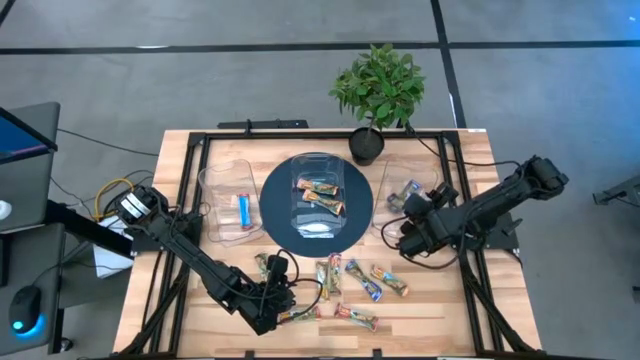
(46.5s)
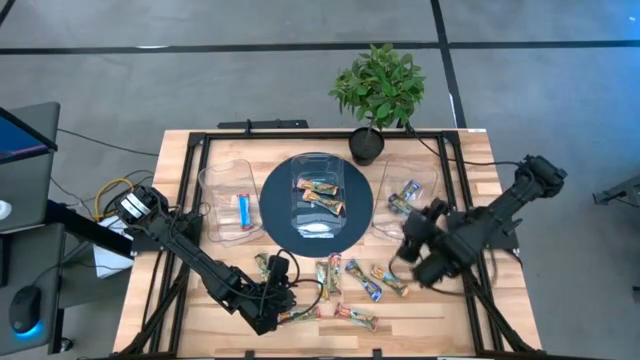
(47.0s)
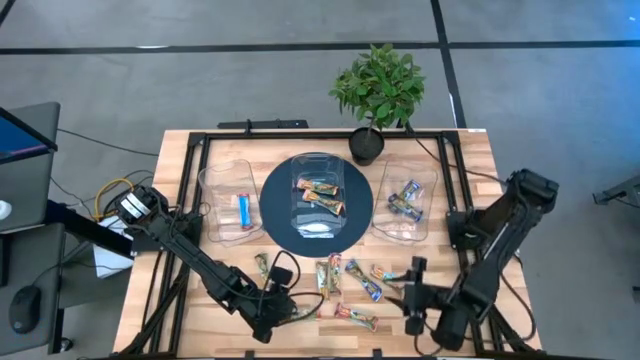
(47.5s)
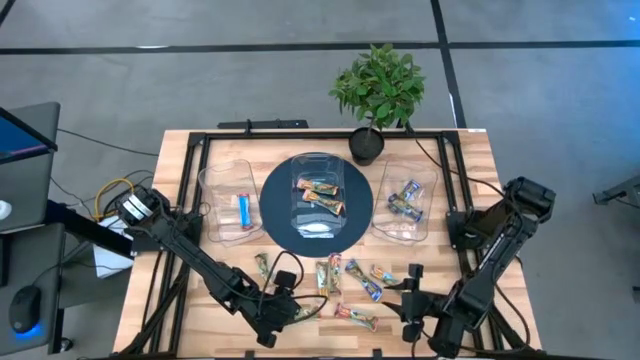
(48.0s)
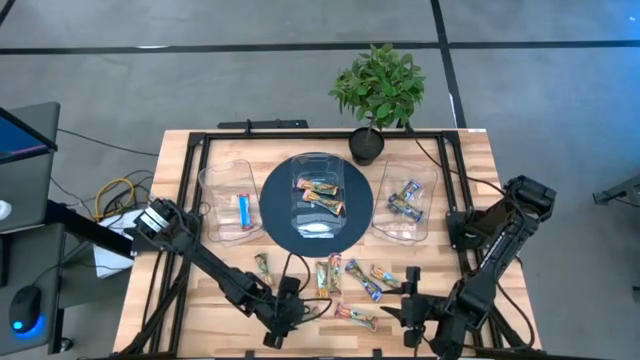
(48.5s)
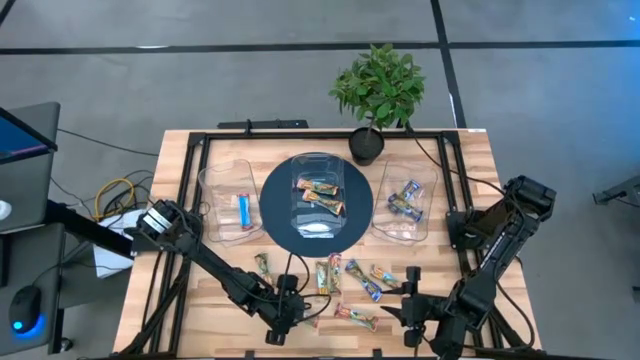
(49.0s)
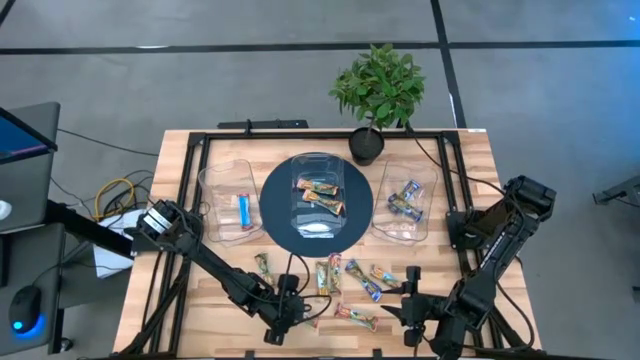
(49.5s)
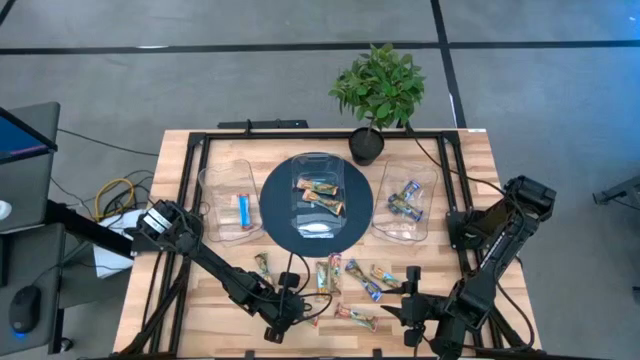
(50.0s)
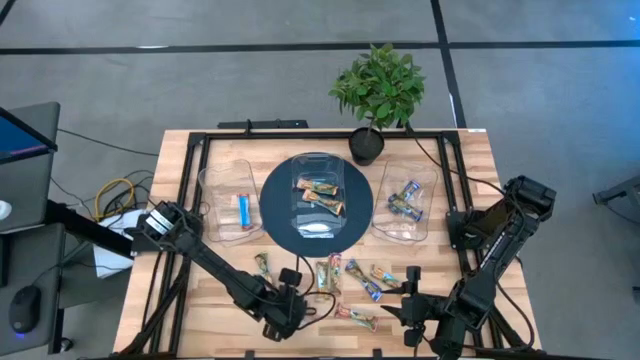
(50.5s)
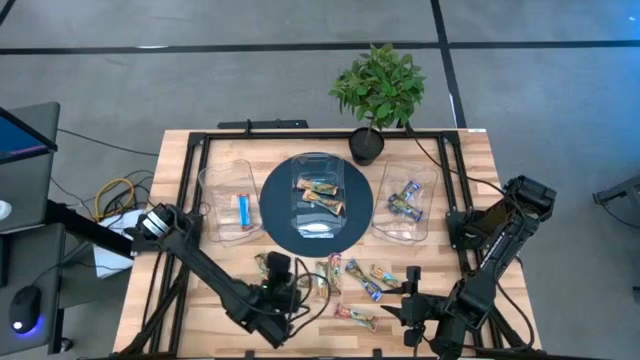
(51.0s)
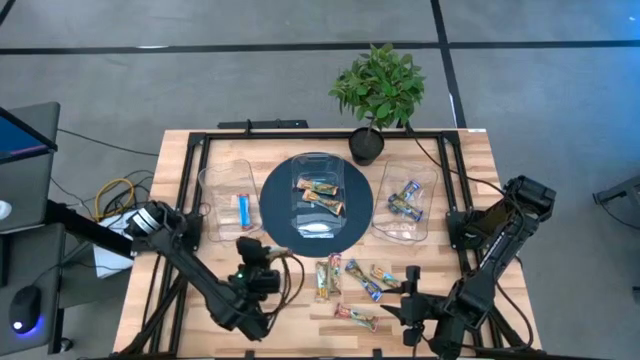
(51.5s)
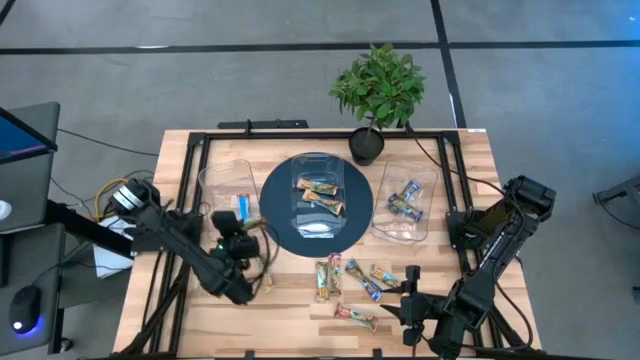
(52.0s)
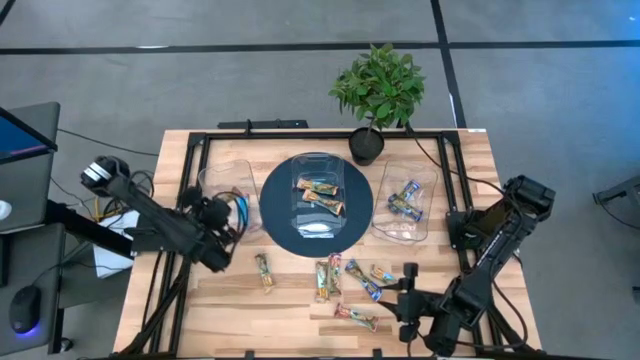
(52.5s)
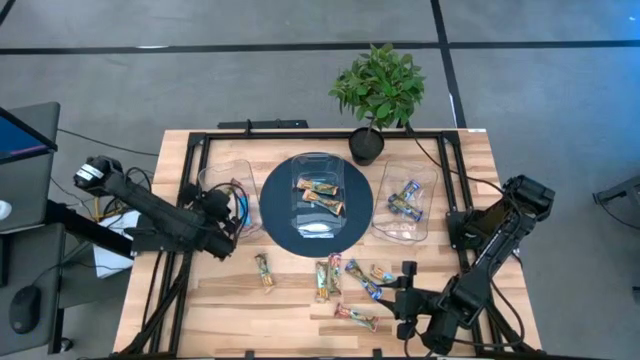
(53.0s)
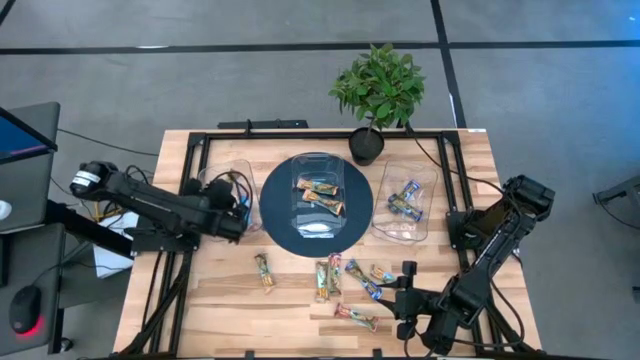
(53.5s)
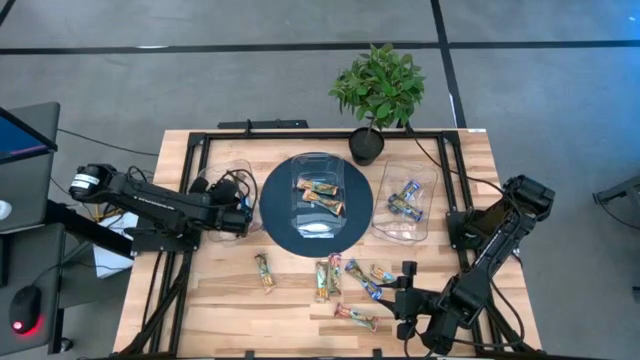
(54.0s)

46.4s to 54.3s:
Task: Pick and place Granola Bars by type
Put the red granola bar into the left transparent bin

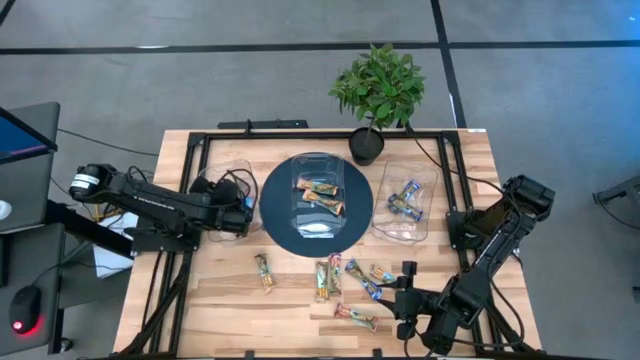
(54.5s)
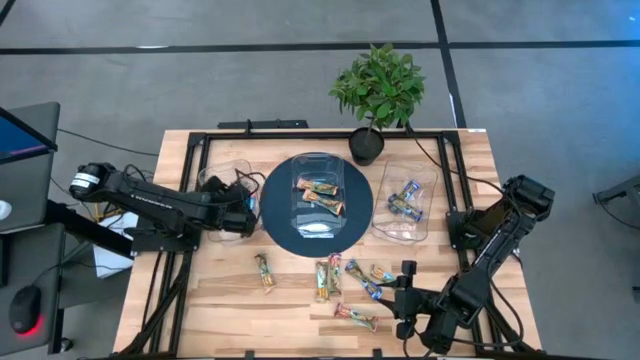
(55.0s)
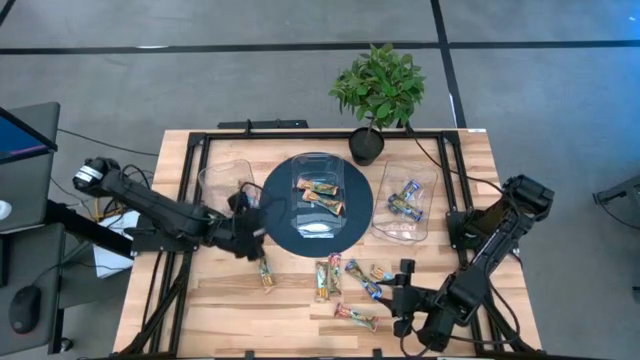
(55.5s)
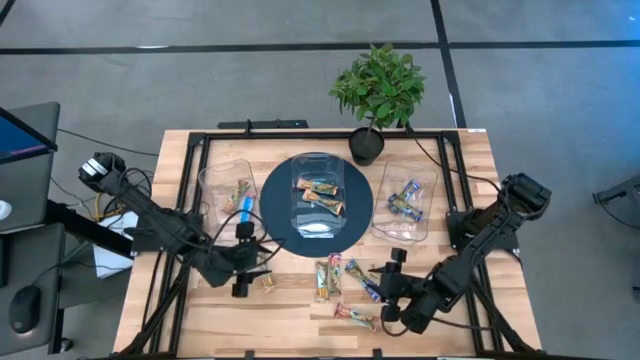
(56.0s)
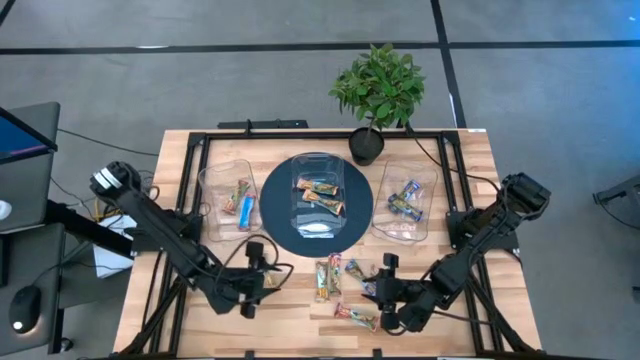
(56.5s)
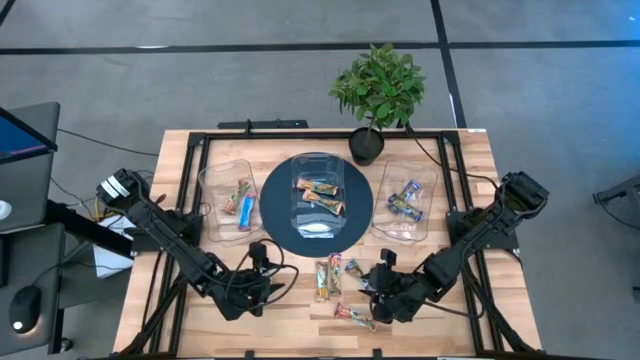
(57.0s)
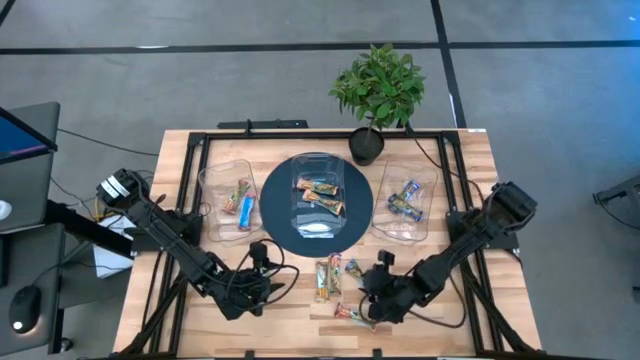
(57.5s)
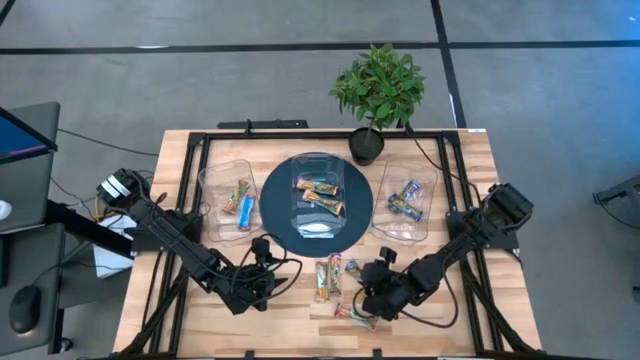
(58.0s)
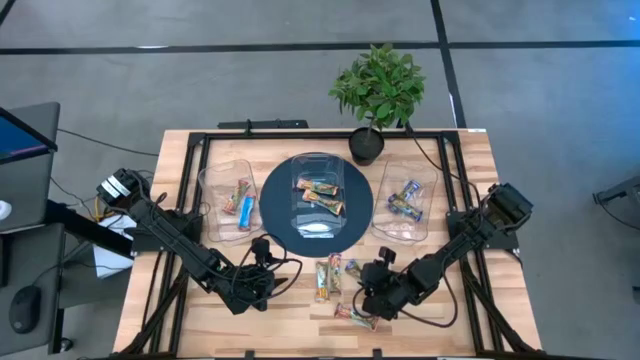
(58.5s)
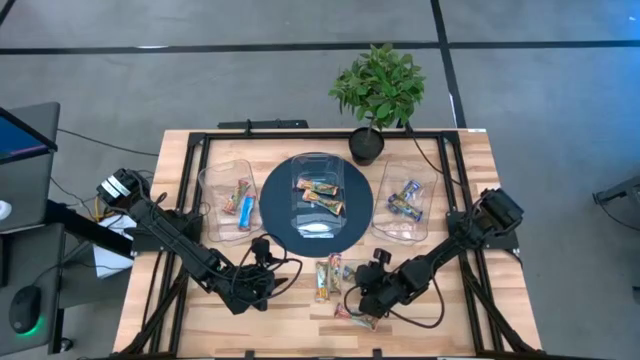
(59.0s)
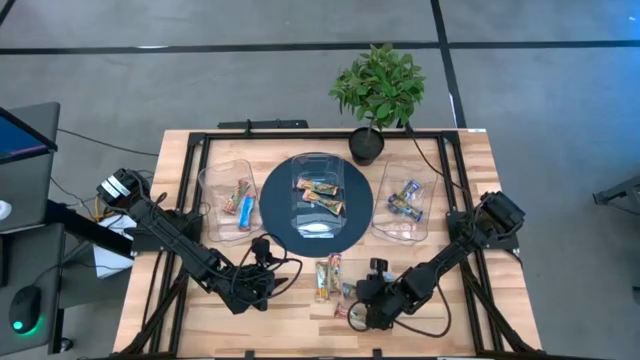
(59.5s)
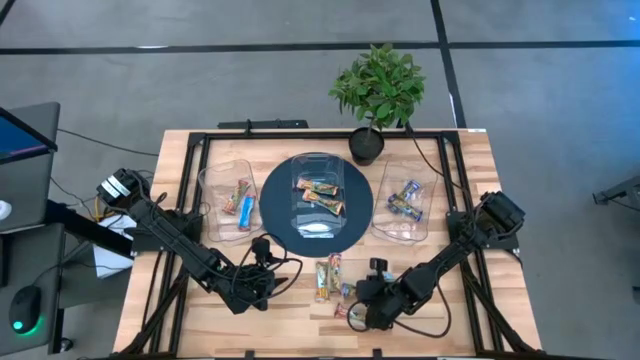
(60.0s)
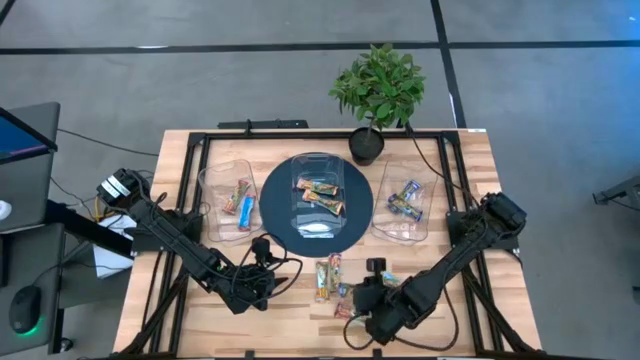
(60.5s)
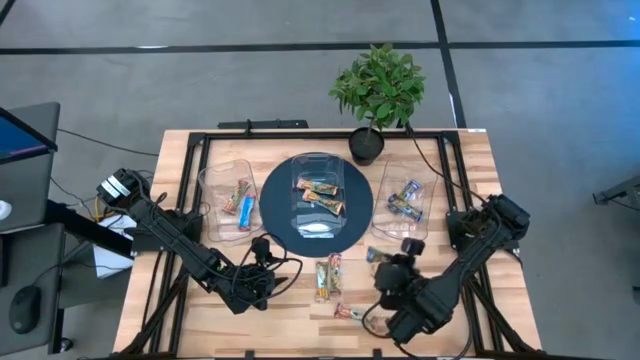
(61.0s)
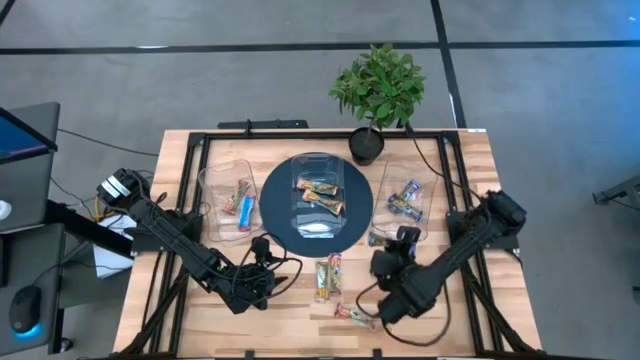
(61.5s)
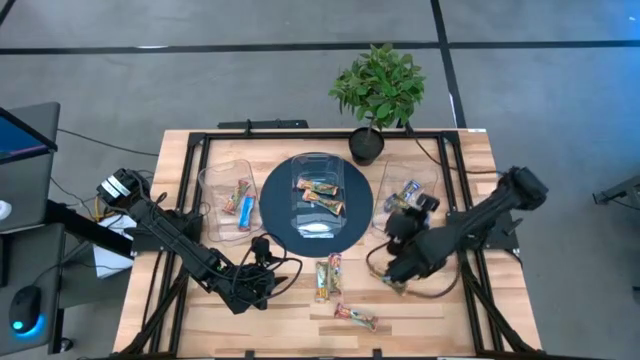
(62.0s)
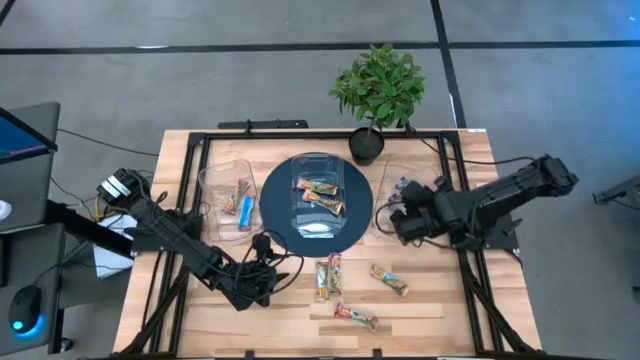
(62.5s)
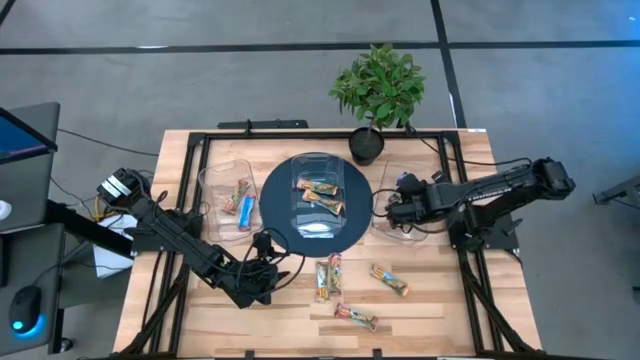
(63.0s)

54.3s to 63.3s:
Put the blue granola bar into the right transparent bin

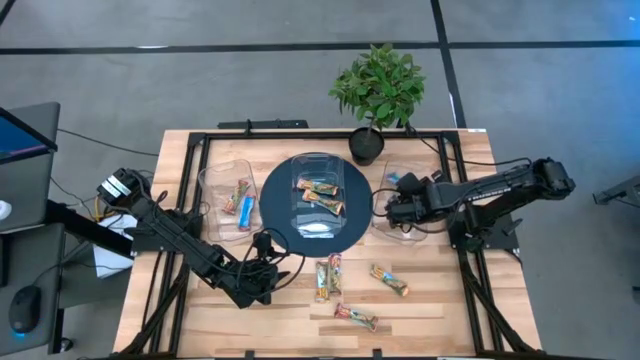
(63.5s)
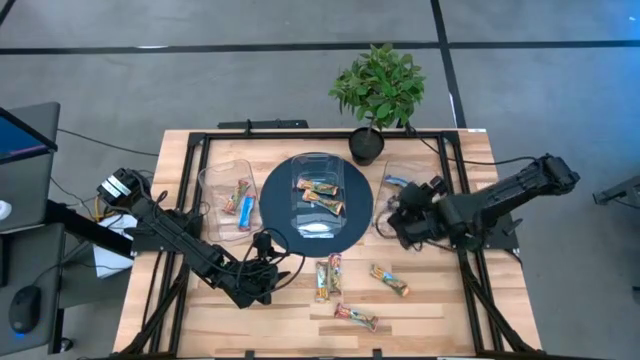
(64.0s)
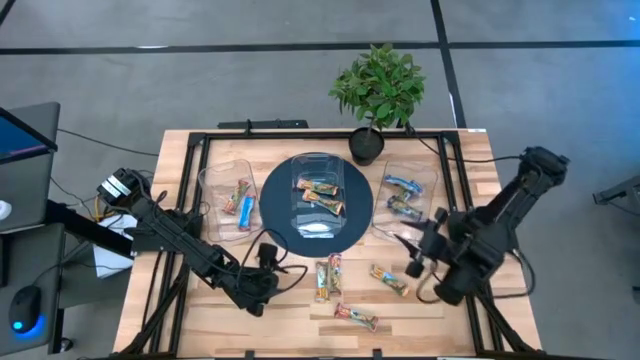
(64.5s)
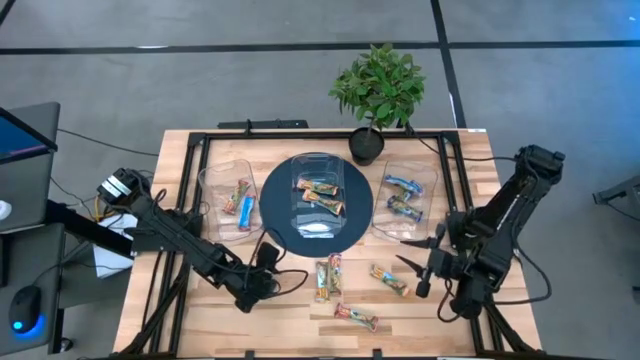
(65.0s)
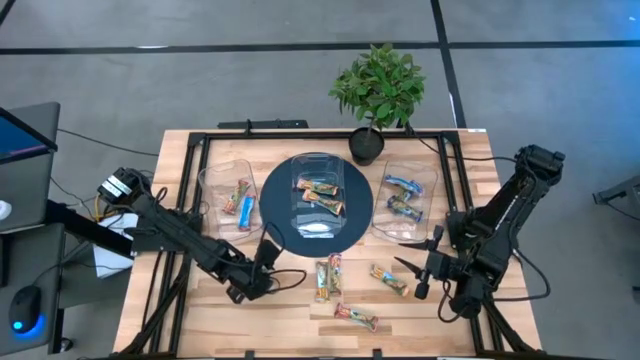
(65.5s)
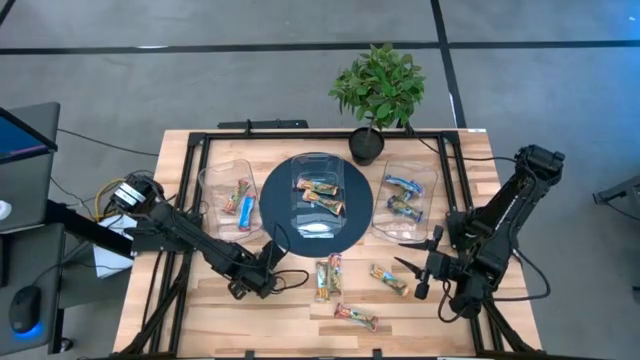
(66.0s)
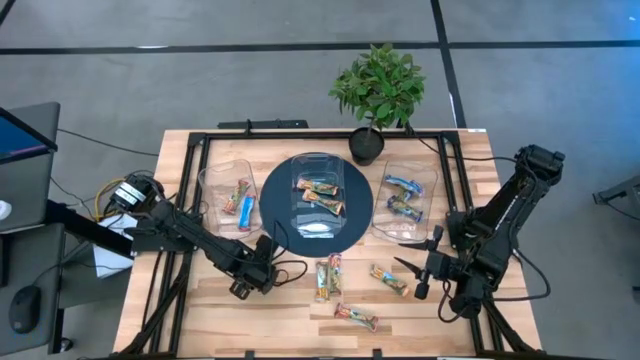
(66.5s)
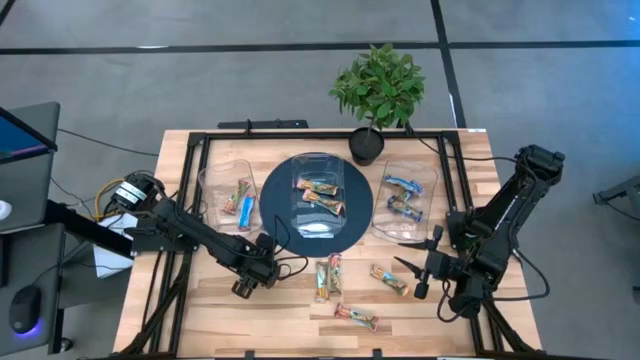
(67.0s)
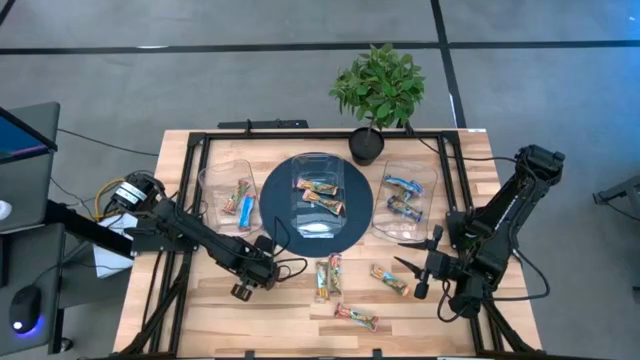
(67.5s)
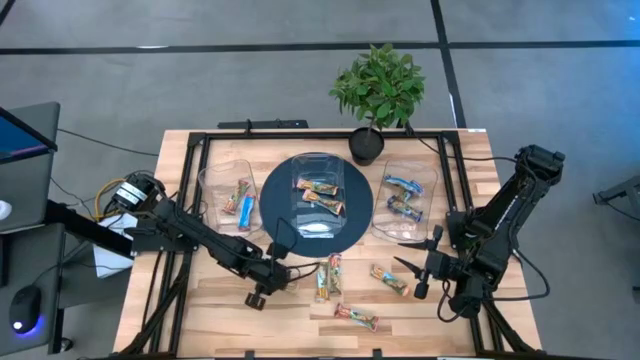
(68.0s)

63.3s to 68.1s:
Put the yellow granola bar into the middle transparent bin
